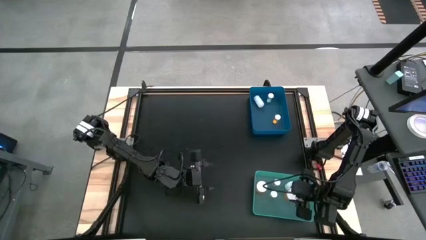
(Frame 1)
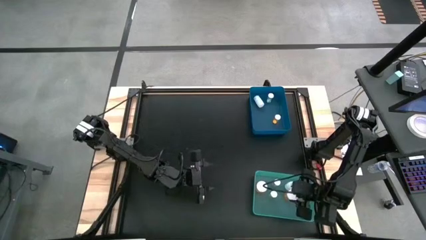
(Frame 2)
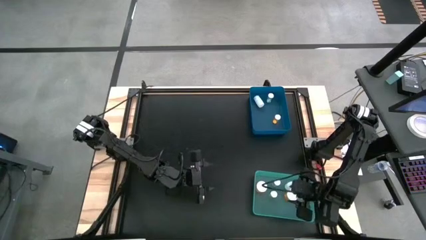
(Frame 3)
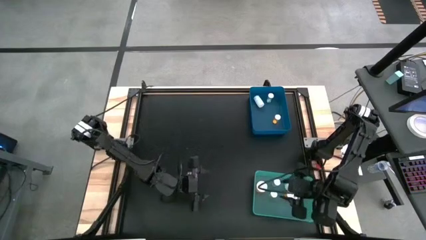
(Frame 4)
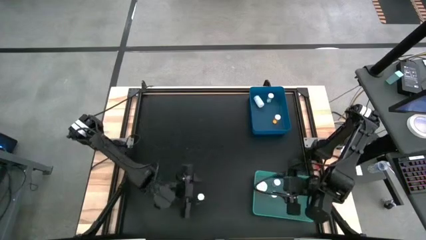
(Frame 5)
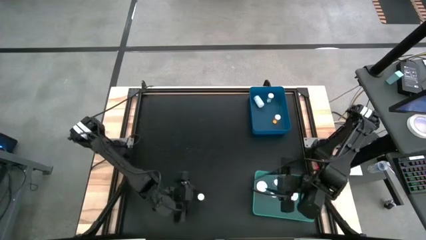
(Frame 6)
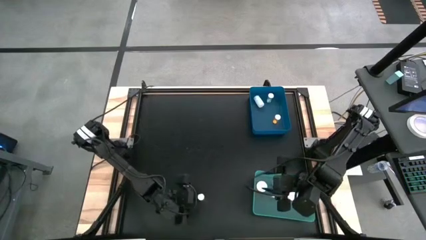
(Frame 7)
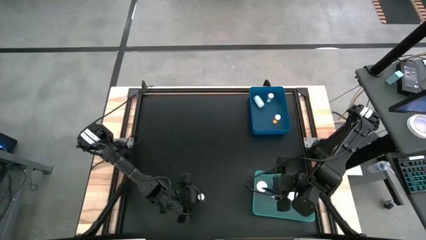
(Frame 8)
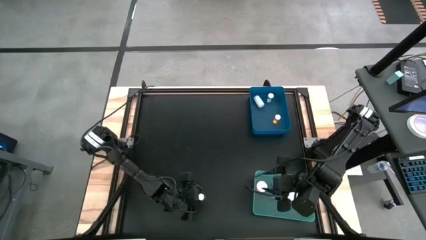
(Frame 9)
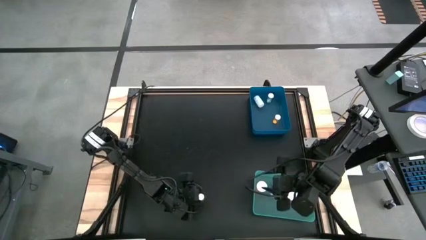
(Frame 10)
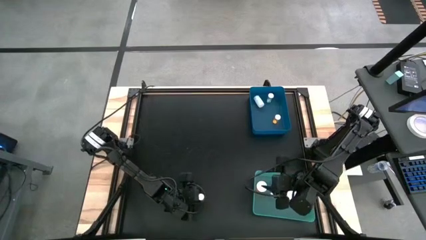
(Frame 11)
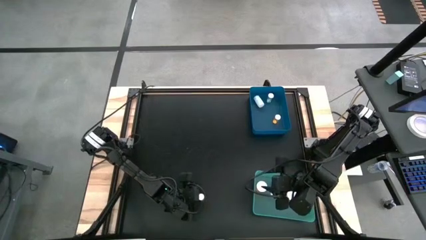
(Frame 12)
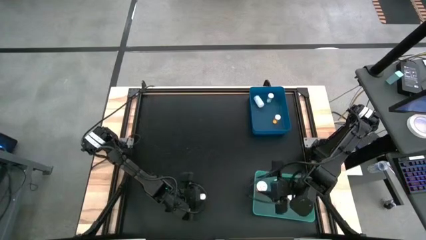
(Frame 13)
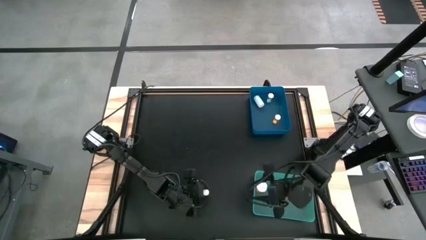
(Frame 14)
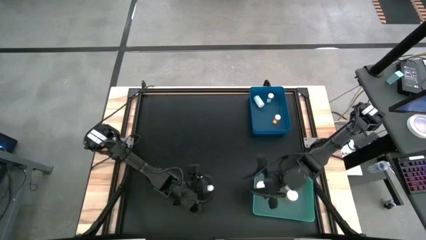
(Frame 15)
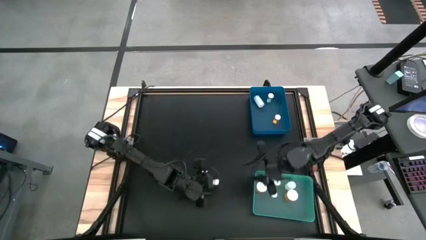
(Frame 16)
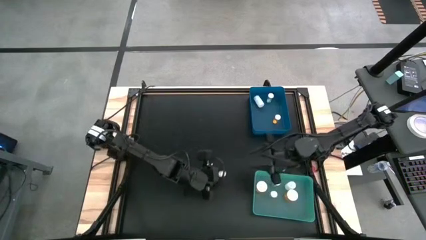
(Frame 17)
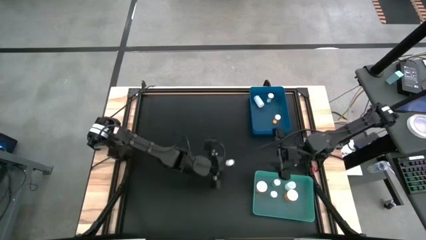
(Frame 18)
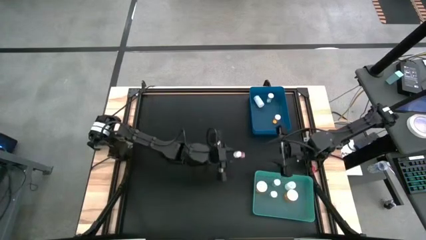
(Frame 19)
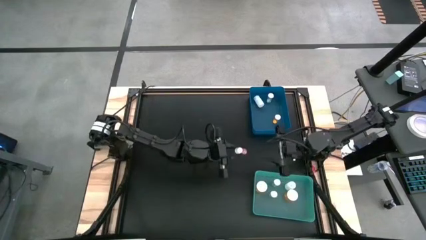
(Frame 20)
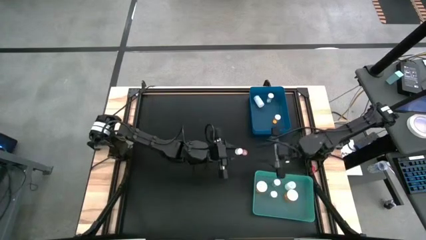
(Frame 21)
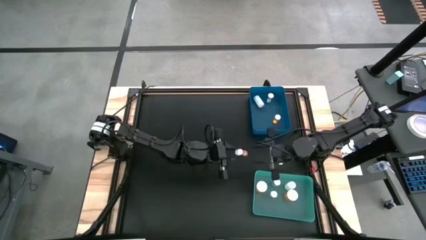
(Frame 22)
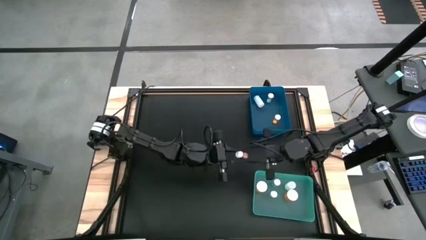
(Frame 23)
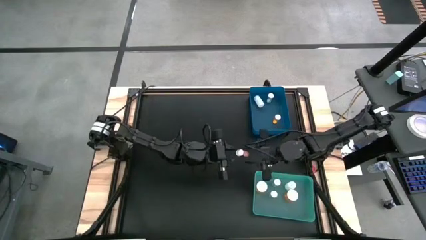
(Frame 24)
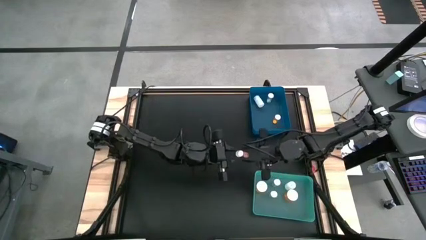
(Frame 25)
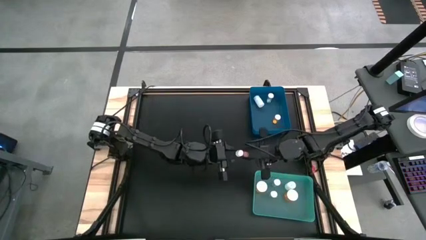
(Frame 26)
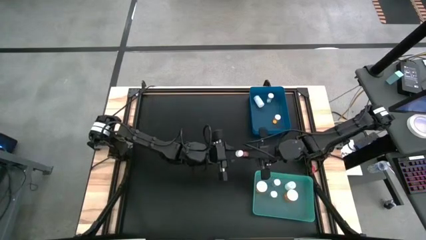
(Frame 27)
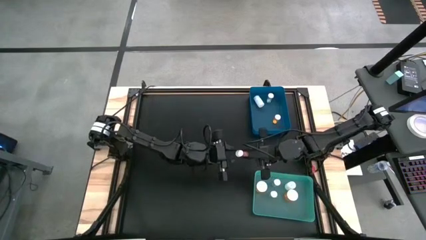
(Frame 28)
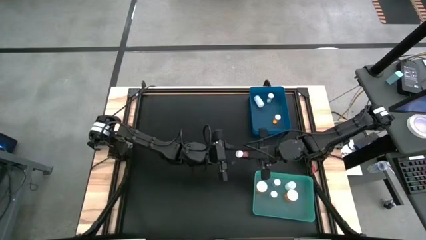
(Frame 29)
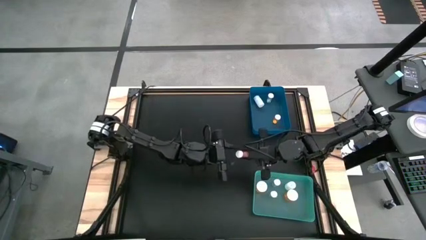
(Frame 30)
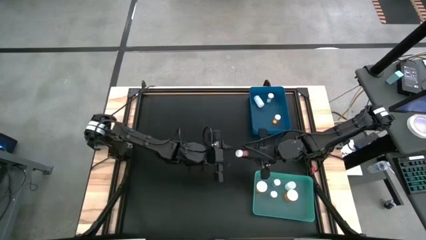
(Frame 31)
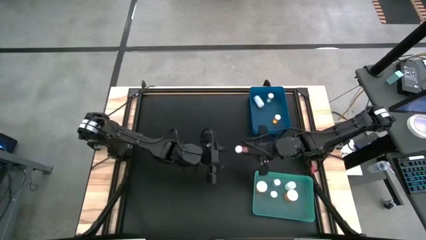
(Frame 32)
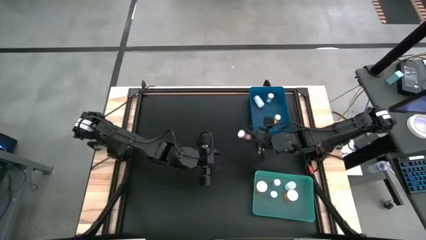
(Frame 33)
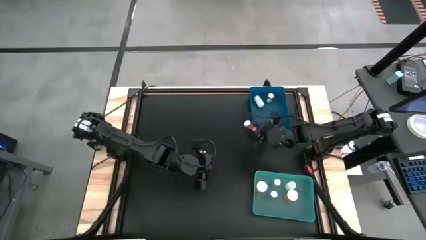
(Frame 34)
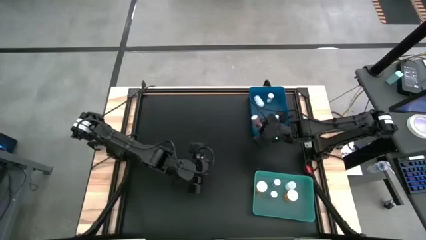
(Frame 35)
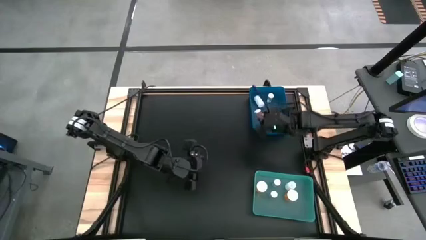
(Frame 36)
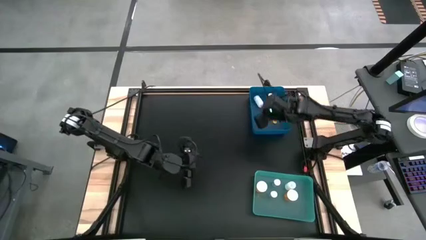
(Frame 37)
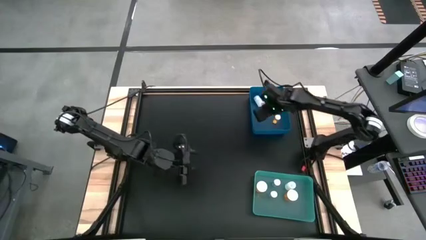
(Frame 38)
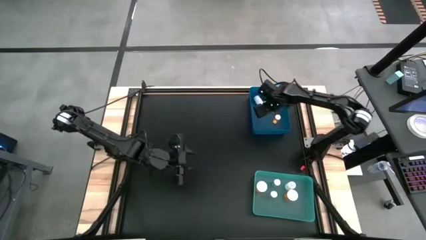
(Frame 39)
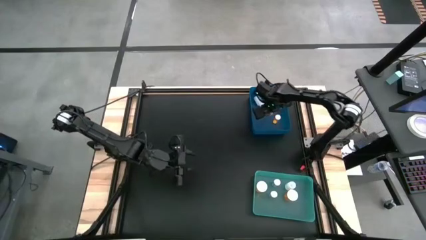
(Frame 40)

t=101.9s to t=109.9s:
Task: Pick and place medicine bottles into bin by pill shape (circle, oval)
Put the red pill bottle into the blue bin

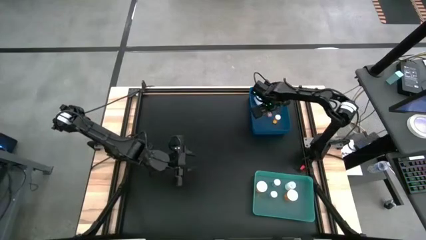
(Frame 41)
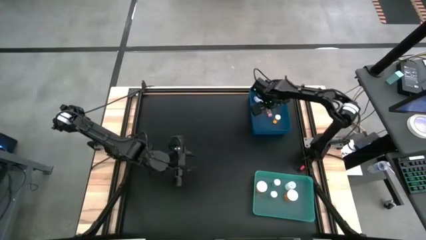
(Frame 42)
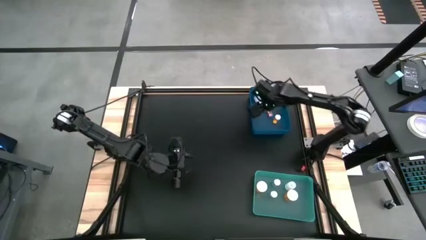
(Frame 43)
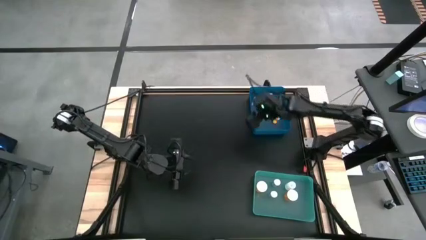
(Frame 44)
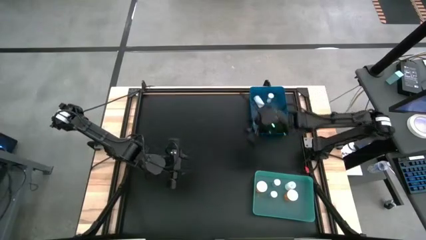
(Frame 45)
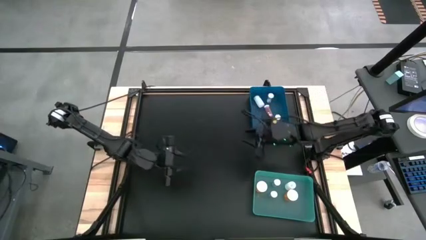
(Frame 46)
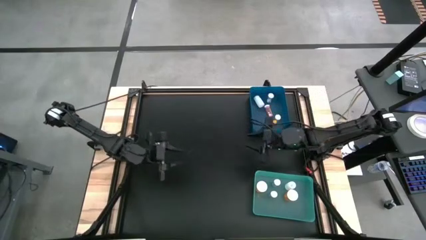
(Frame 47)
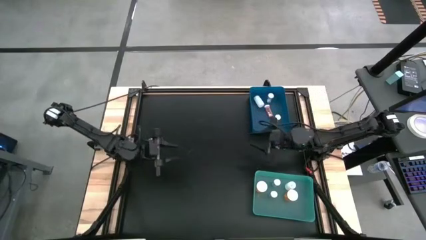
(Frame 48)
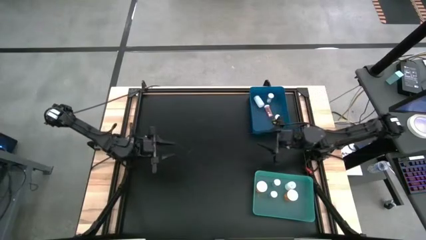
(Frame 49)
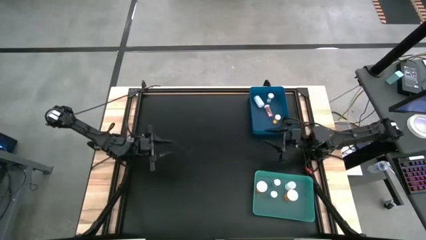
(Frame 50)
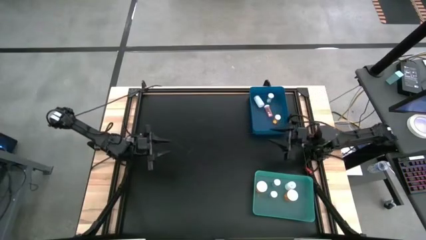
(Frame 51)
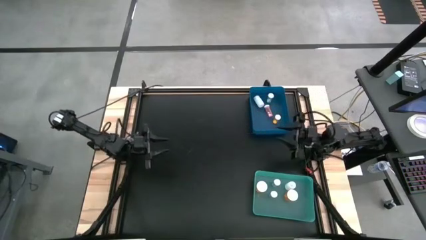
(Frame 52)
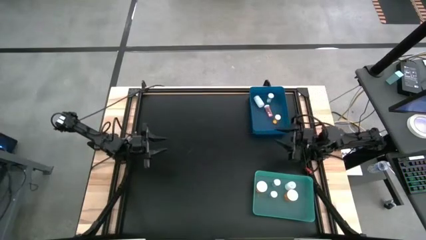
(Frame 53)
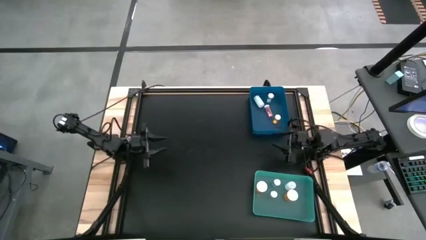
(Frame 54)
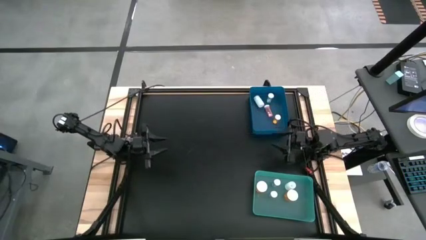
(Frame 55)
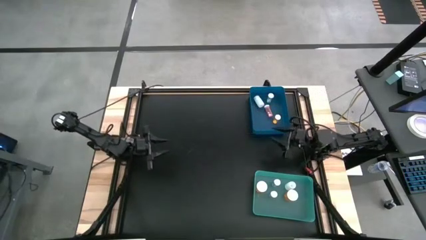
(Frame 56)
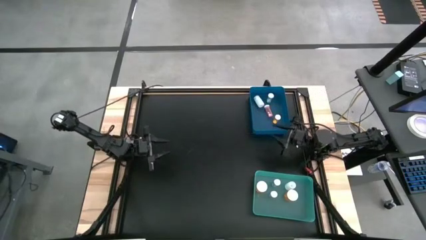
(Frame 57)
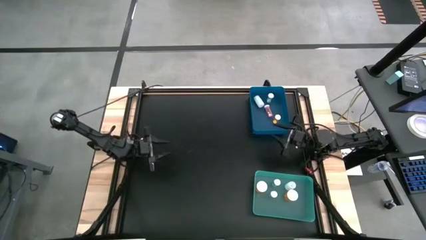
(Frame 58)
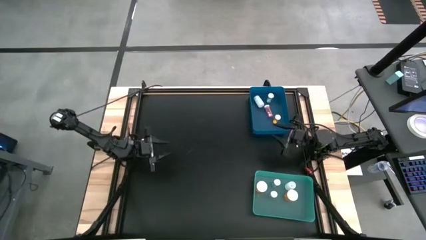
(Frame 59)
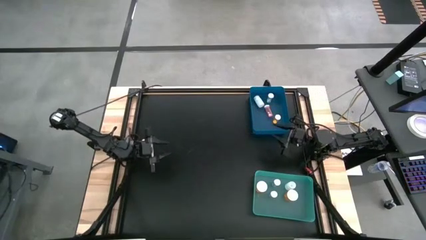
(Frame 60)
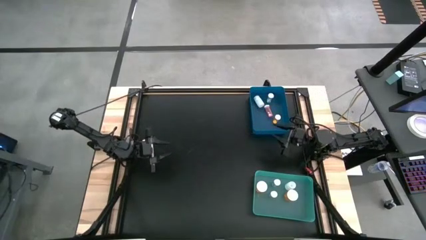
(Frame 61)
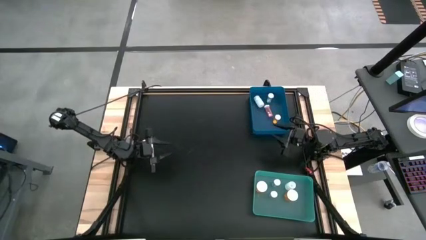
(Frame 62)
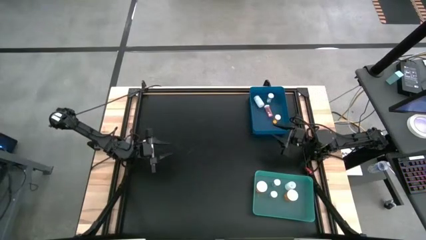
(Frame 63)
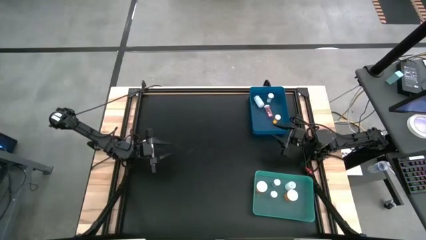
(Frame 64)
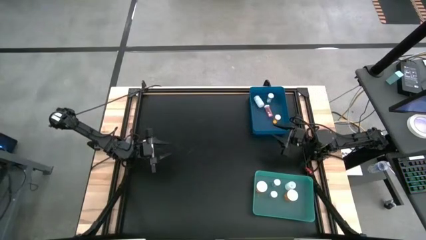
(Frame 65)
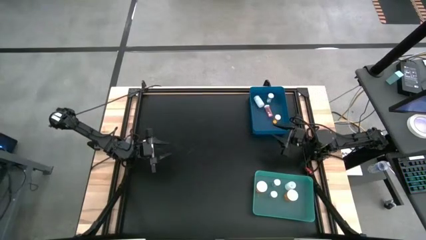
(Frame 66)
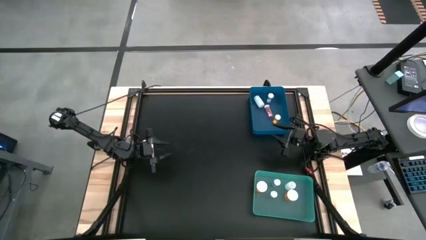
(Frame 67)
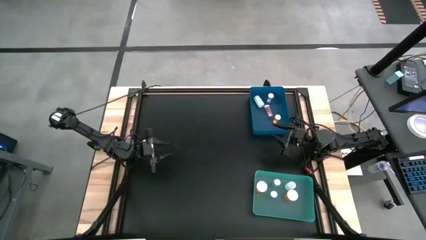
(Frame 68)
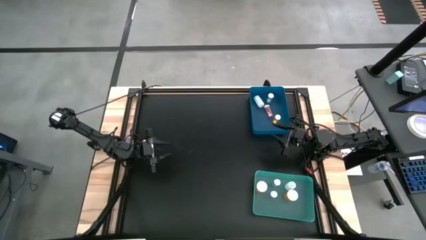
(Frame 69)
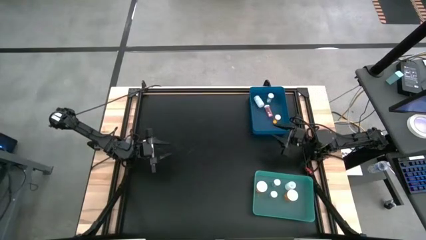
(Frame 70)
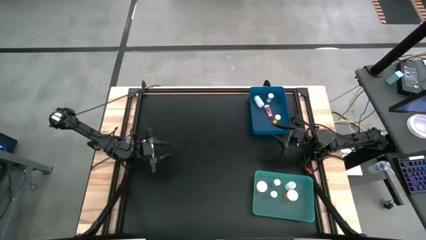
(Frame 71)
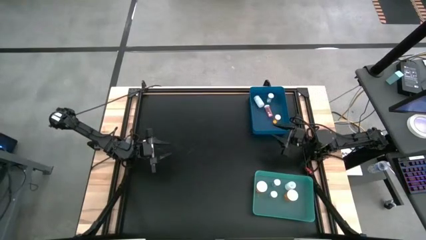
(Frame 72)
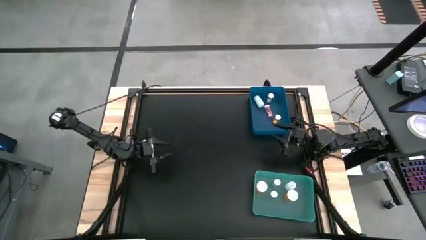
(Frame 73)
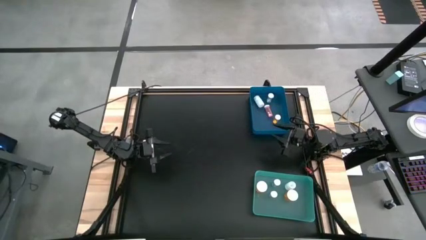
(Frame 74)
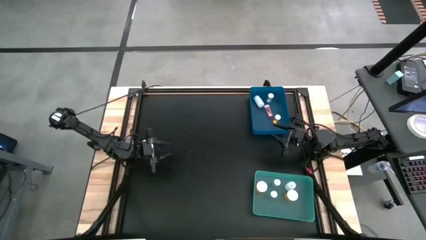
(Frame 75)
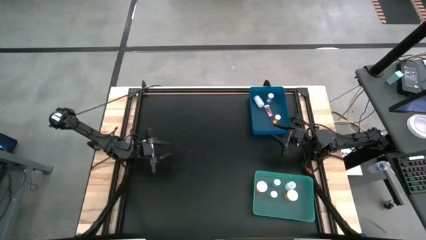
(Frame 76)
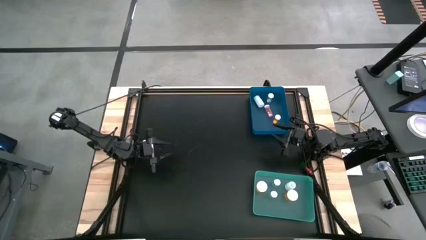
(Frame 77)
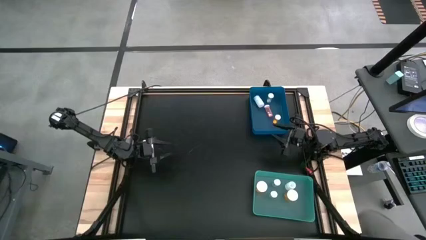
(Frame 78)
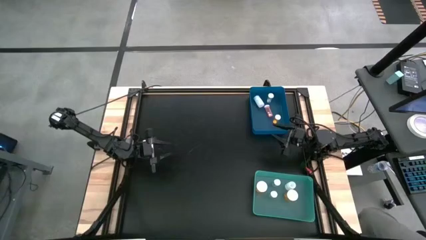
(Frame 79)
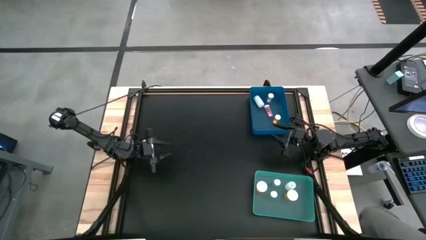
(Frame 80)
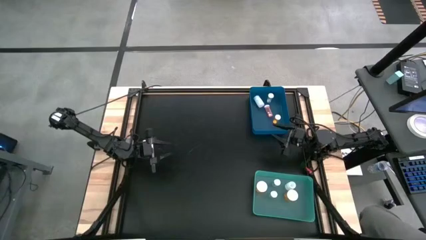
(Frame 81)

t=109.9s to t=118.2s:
Return to Home Position
